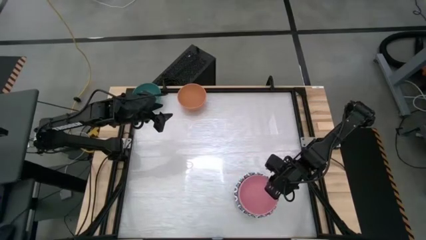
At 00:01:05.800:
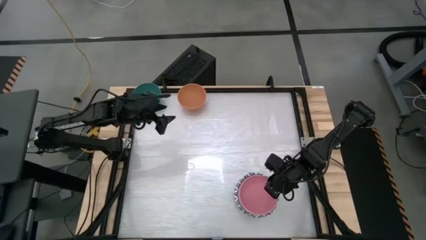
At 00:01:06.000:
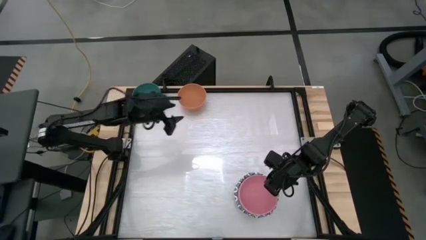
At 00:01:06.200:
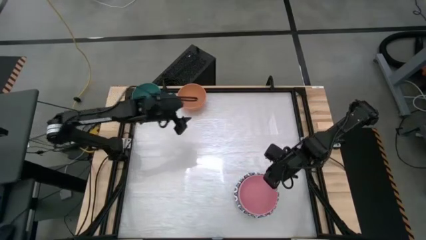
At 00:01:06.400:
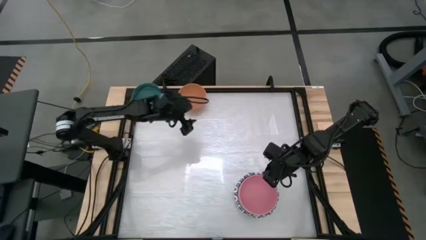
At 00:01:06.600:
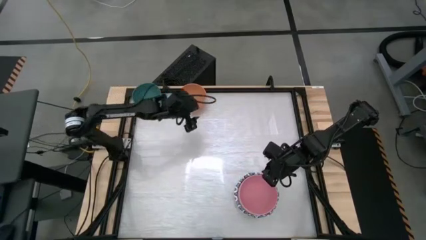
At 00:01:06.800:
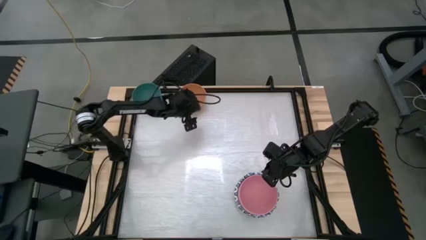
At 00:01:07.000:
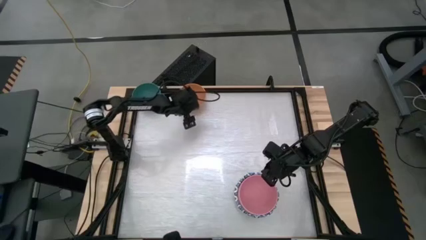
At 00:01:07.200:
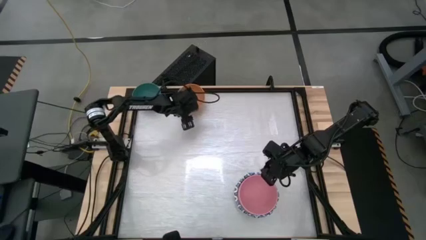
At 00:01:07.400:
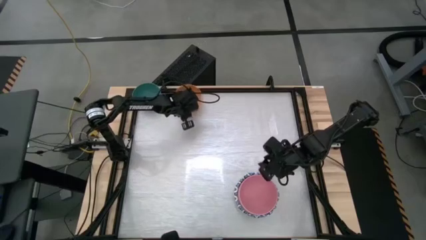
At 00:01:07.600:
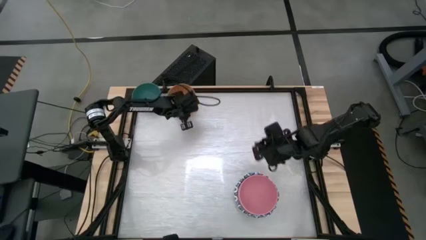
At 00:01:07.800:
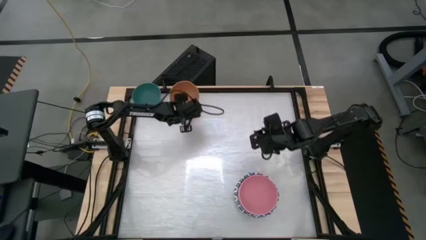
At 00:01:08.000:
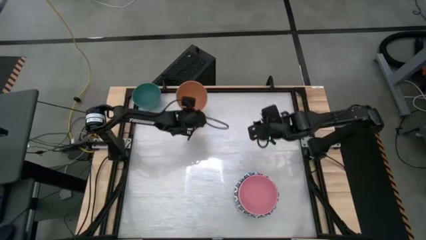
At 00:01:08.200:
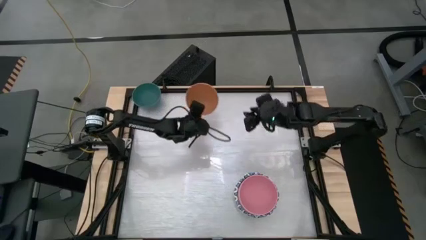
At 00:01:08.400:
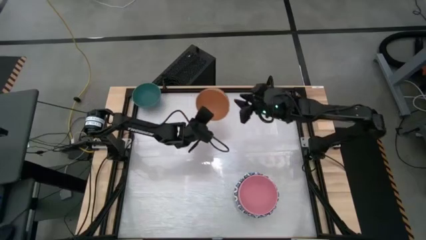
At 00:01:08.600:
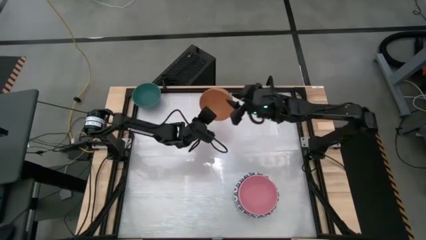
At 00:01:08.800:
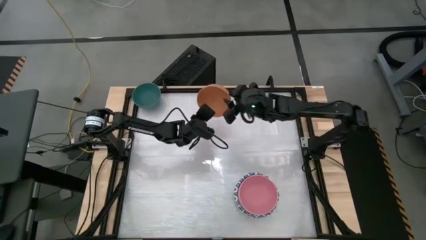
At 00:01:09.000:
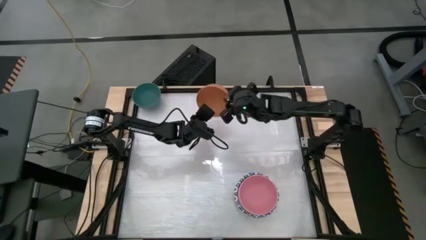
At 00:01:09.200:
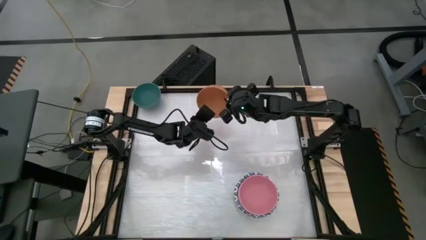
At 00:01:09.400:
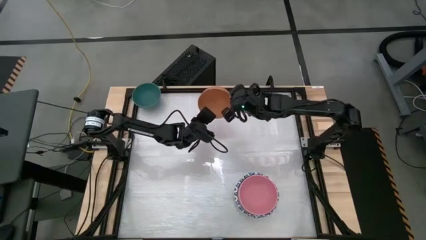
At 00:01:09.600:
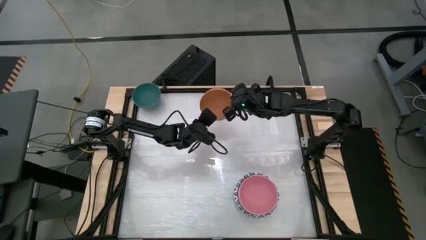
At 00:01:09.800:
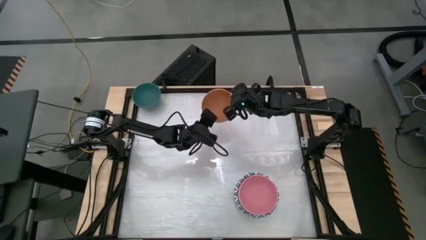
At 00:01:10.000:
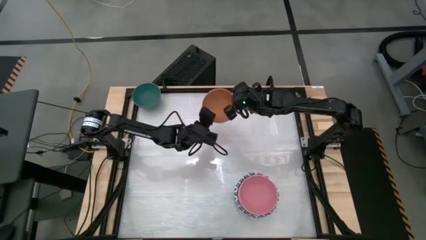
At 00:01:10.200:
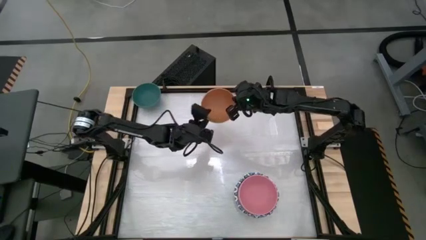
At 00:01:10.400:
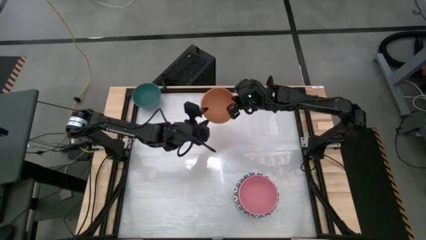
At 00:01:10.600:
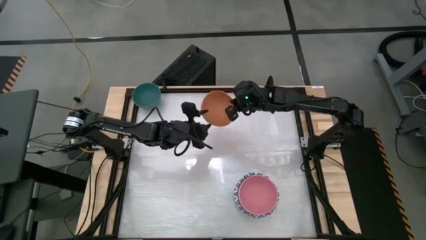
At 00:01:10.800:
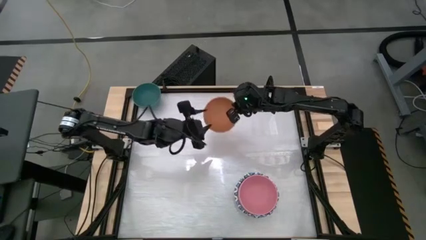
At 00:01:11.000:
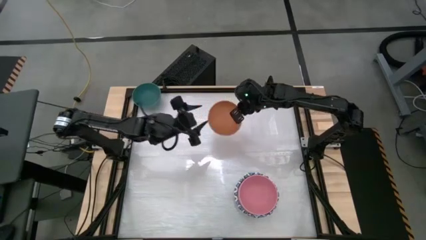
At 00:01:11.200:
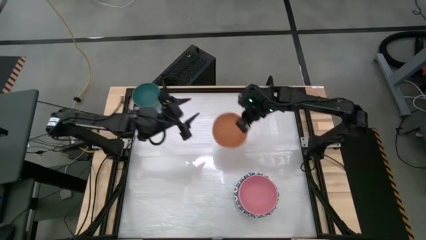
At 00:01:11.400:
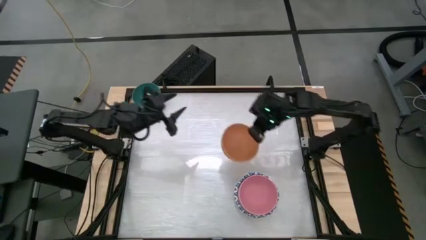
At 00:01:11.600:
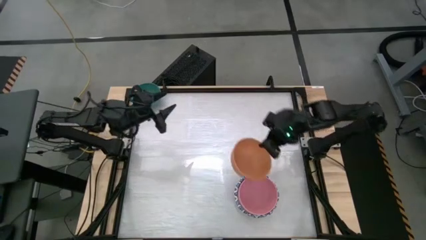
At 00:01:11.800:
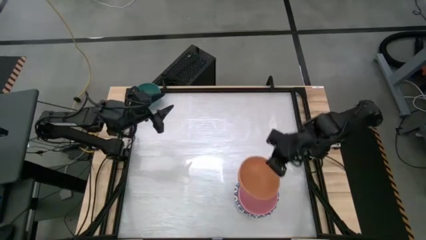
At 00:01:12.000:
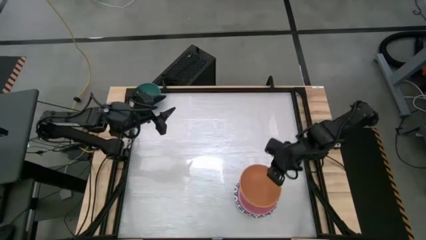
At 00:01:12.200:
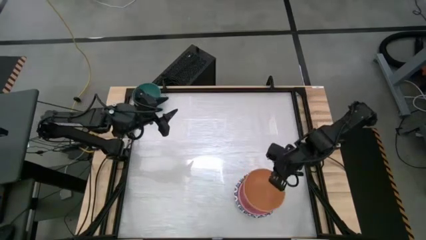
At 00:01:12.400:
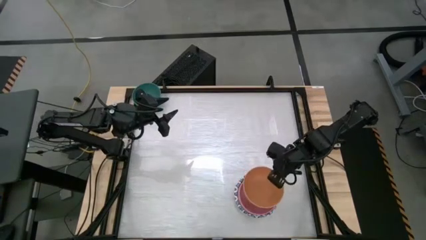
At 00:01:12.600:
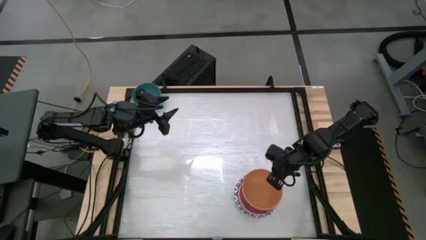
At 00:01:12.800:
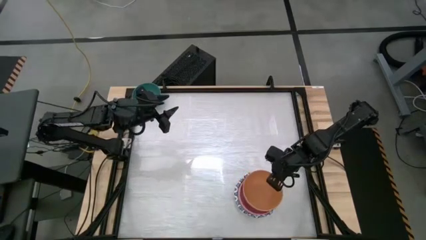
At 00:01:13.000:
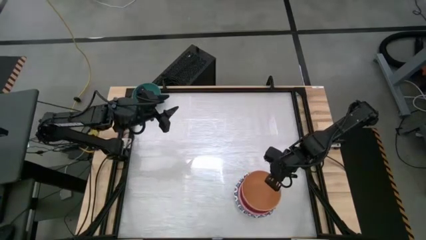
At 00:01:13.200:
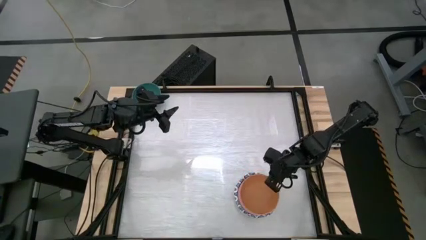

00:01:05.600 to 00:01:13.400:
Stack the orange bowl on top of the pink bowl

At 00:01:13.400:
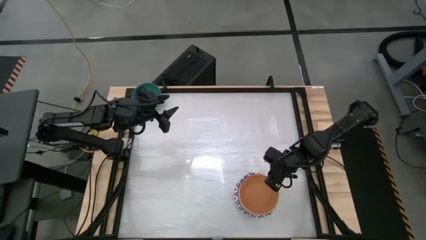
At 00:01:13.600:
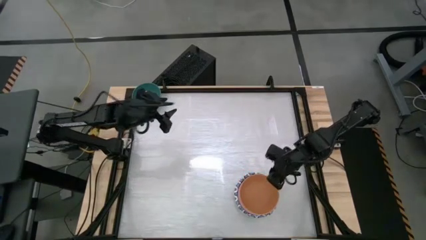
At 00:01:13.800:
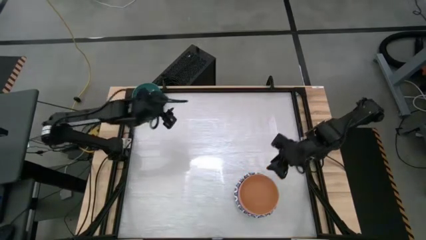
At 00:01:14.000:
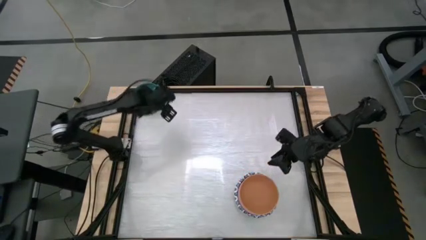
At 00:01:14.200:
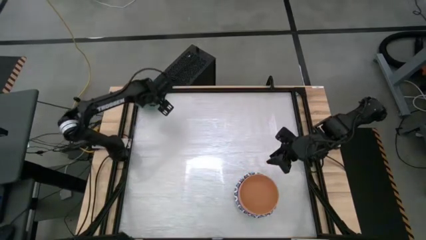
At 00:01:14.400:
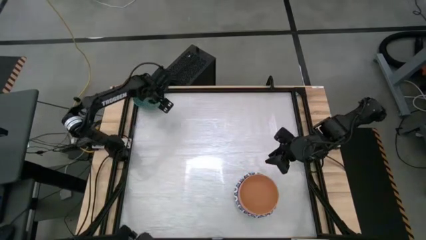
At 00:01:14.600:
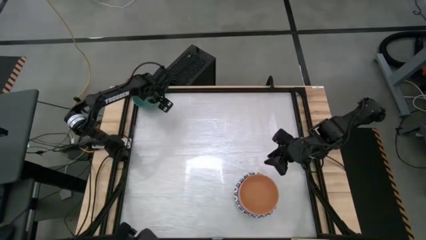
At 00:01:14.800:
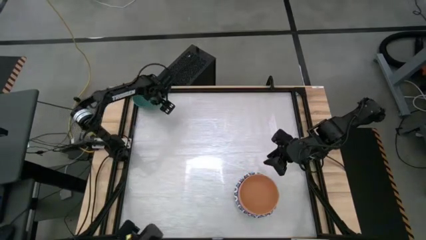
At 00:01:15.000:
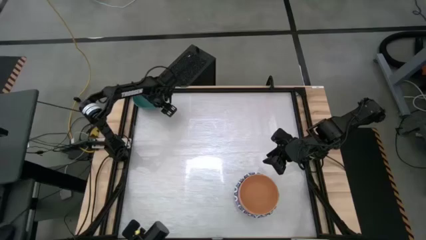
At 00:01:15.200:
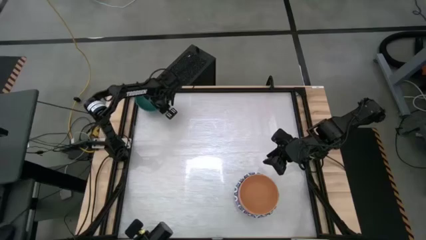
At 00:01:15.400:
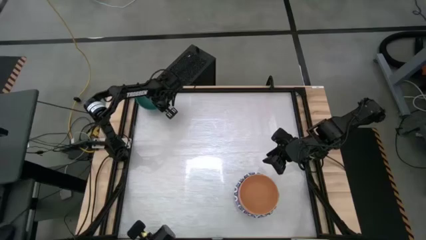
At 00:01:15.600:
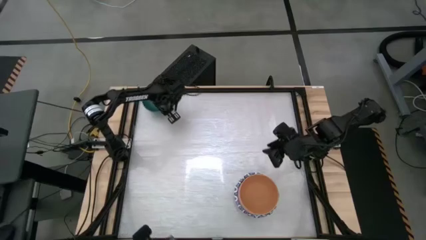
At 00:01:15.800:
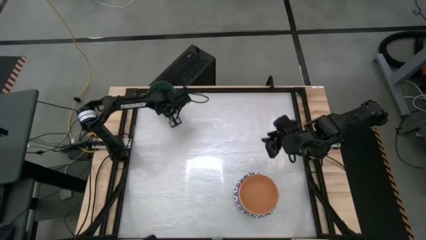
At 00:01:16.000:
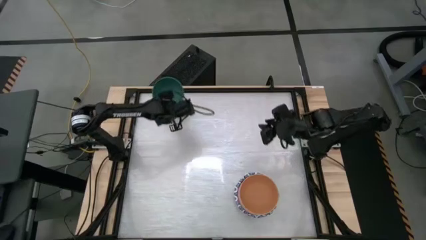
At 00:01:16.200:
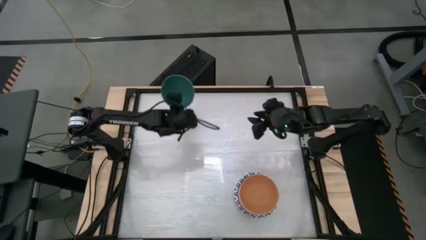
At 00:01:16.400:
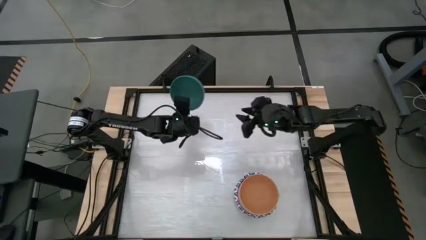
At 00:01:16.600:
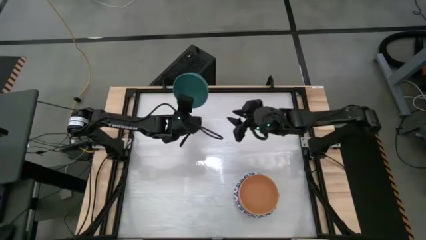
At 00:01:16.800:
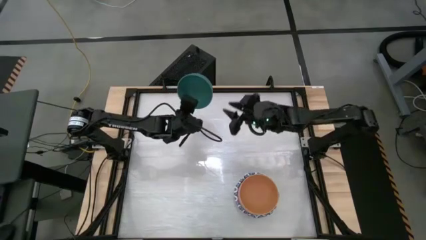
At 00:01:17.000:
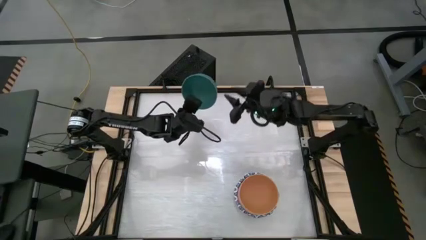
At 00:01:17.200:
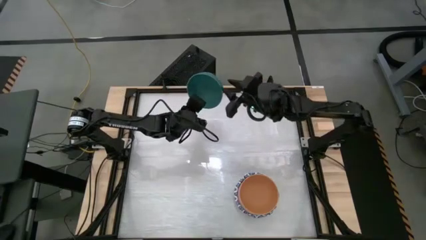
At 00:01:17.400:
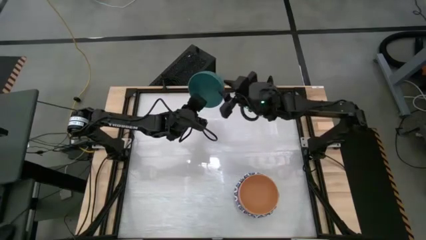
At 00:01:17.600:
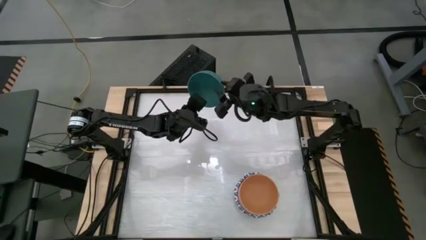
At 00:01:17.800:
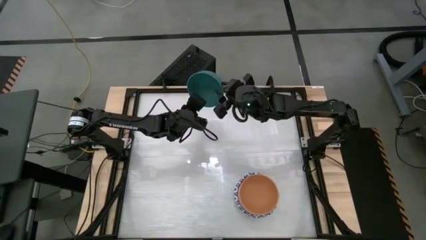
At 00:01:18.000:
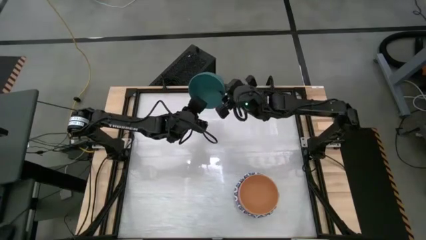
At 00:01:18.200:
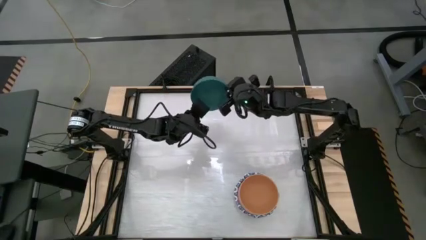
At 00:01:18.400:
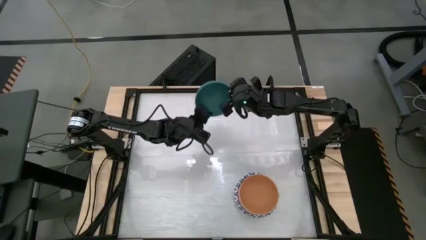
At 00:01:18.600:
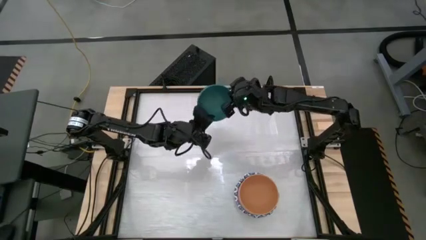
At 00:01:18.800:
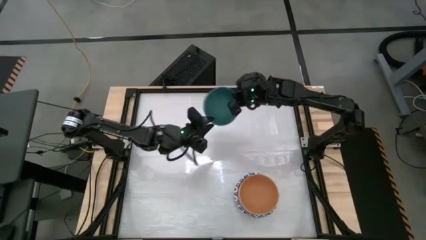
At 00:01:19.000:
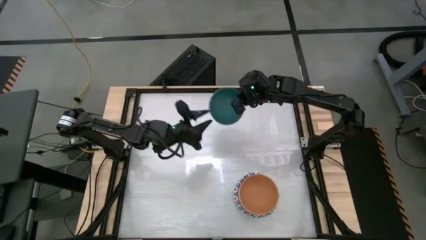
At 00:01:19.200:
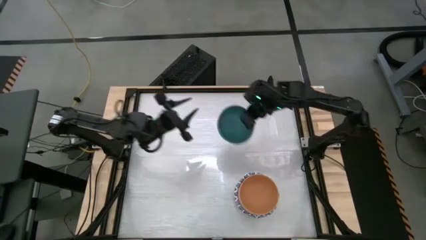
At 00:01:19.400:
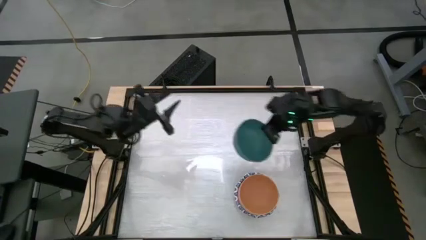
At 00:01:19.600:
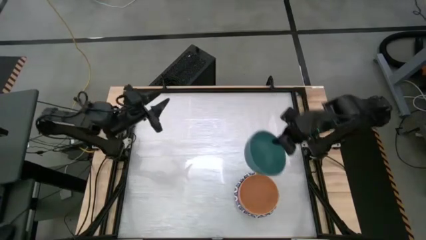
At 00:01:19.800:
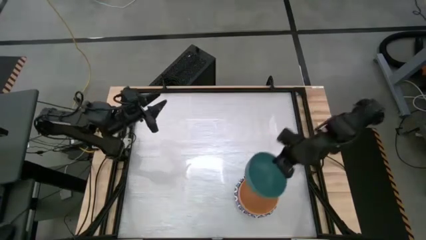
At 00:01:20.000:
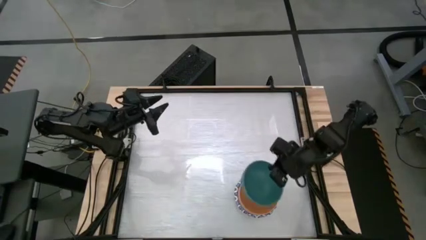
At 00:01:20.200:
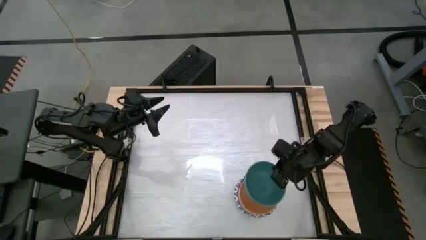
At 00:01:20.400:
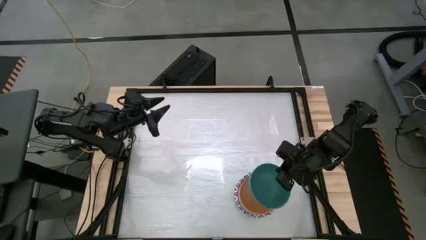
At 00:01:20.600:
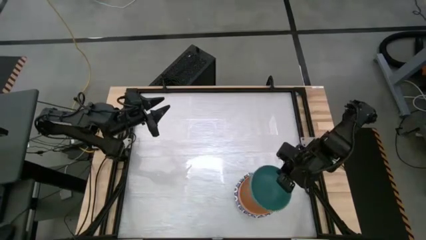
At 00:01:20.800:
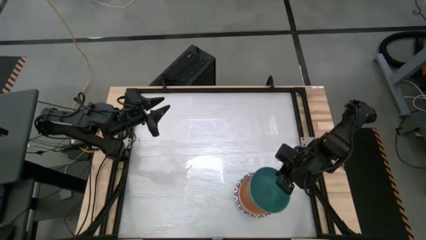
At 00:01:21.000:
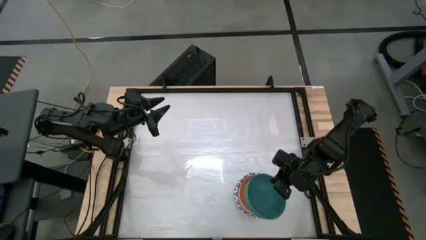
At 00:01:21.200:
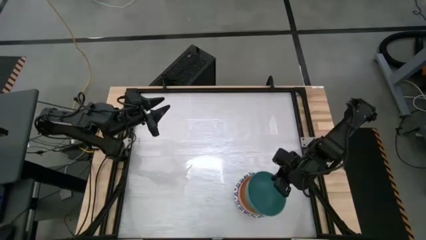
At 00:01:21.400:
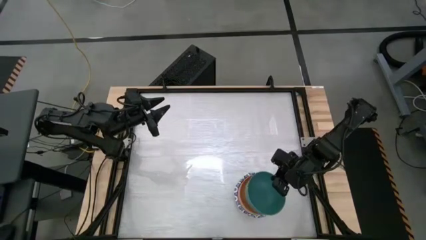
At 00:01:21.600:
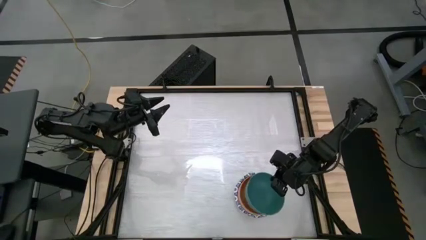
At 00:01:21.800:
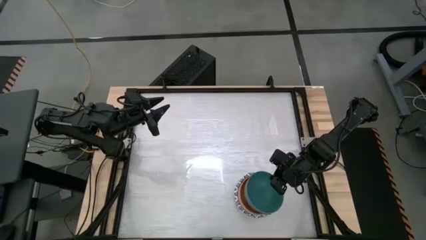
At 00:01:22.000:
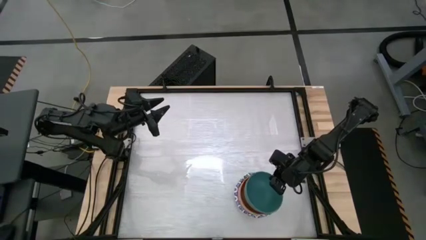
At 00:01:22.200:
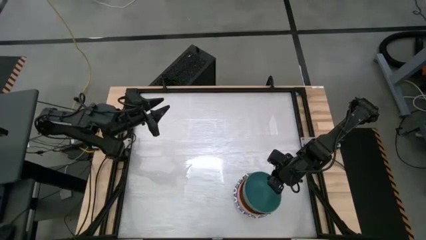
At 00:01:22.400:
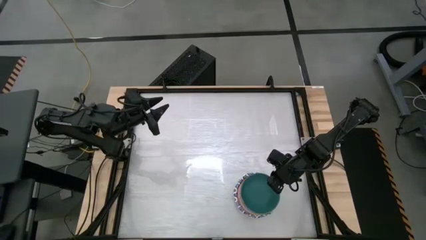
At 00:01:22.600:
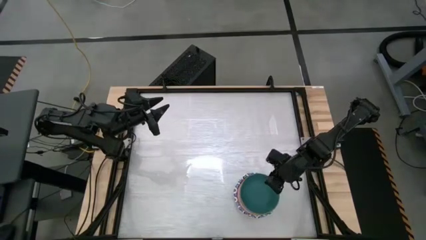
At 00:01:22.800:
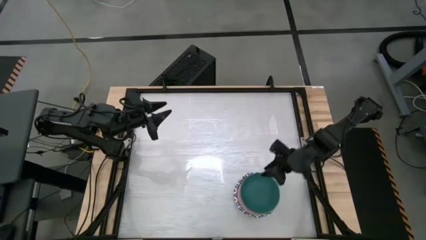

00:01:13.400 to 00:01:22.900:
Stack the green bowl on top of the orange bowl
